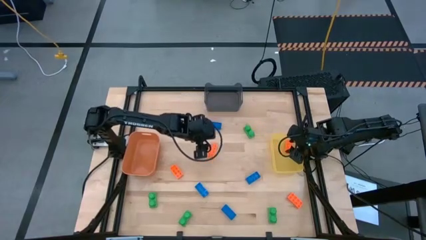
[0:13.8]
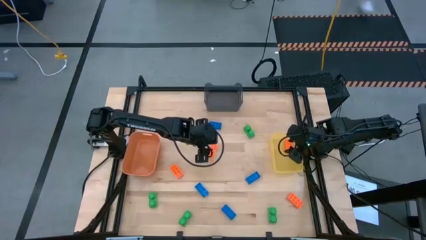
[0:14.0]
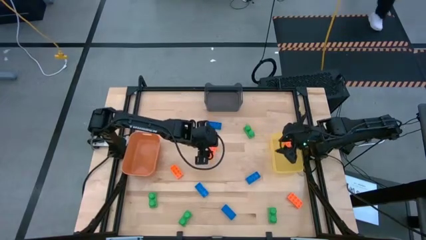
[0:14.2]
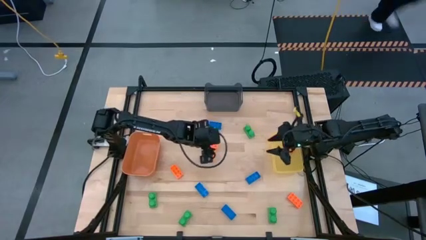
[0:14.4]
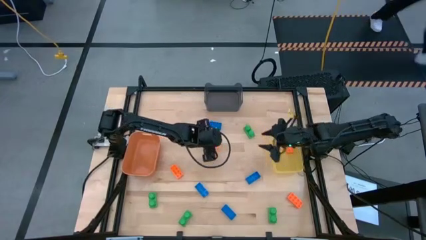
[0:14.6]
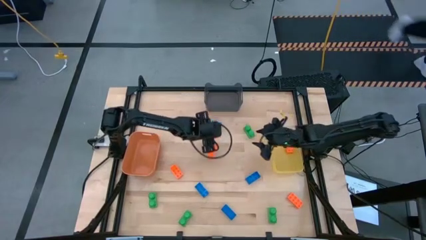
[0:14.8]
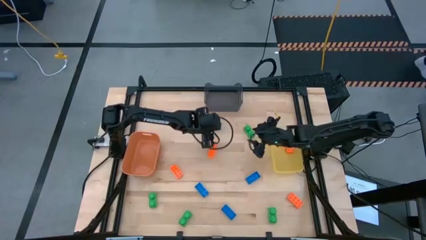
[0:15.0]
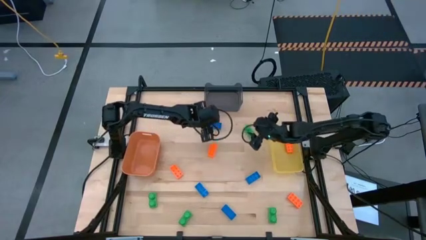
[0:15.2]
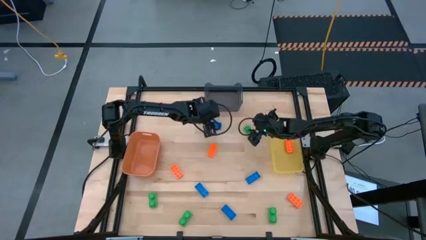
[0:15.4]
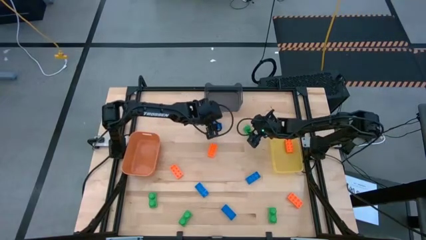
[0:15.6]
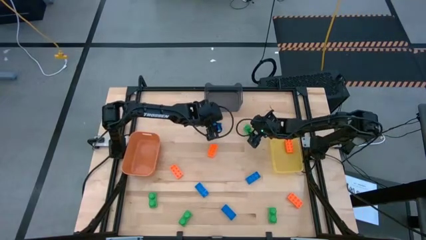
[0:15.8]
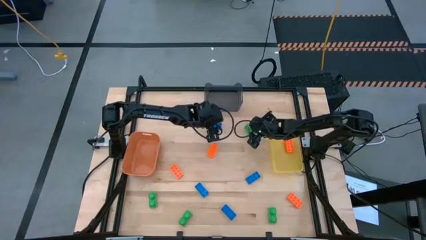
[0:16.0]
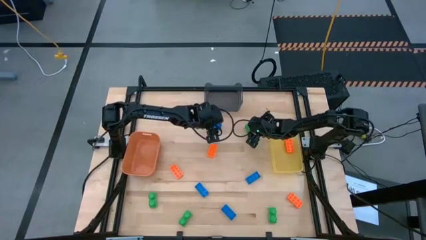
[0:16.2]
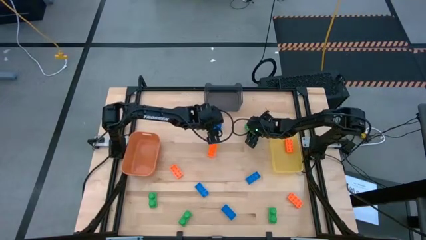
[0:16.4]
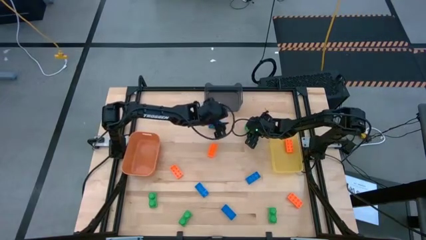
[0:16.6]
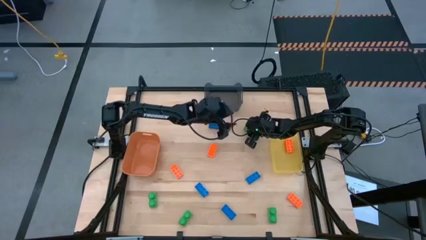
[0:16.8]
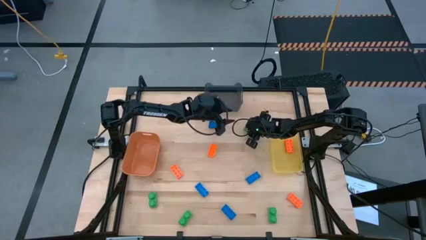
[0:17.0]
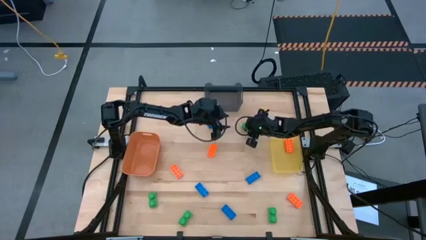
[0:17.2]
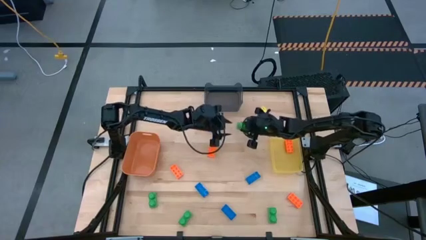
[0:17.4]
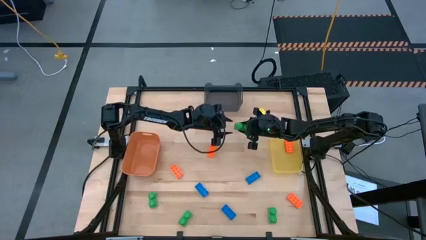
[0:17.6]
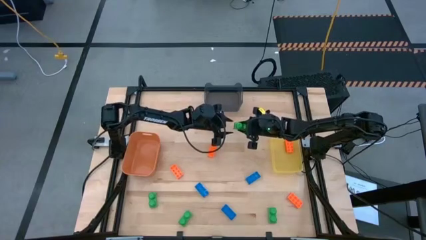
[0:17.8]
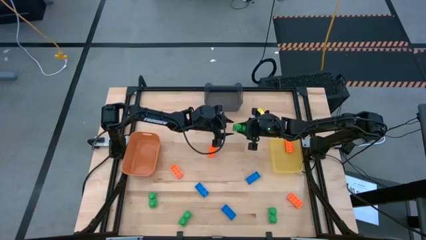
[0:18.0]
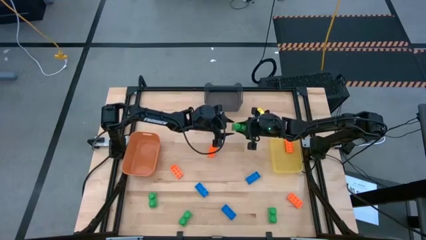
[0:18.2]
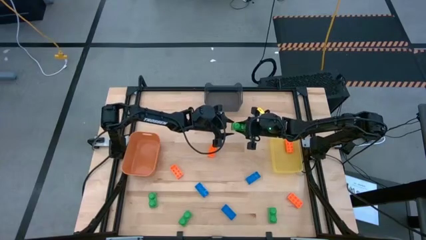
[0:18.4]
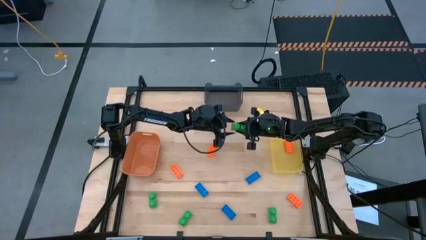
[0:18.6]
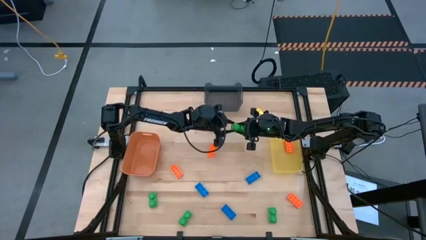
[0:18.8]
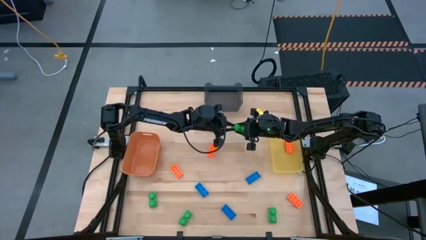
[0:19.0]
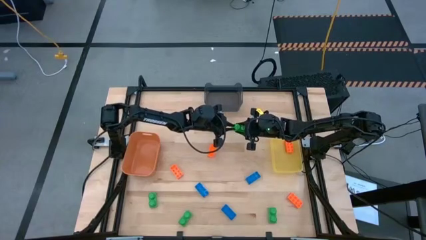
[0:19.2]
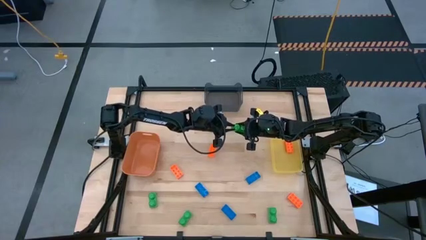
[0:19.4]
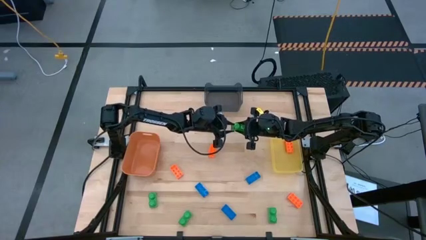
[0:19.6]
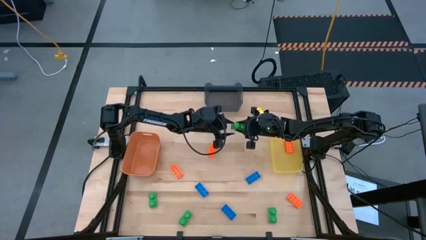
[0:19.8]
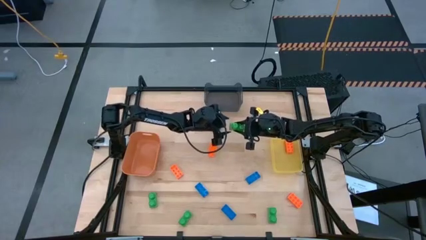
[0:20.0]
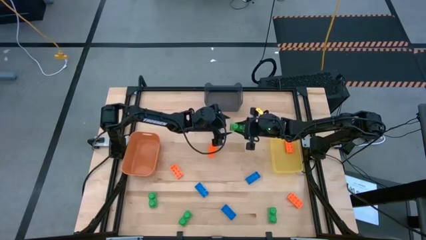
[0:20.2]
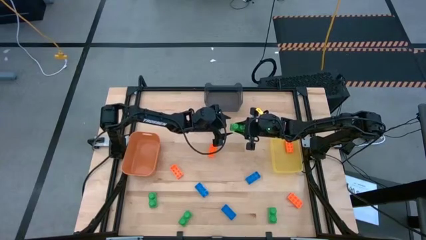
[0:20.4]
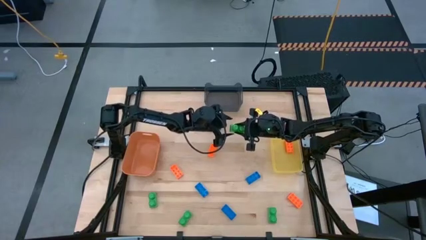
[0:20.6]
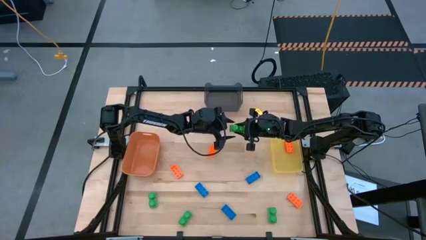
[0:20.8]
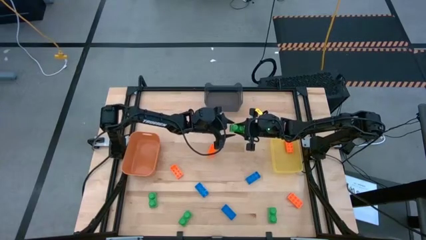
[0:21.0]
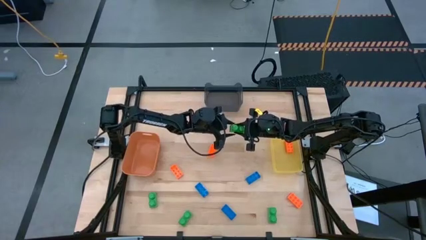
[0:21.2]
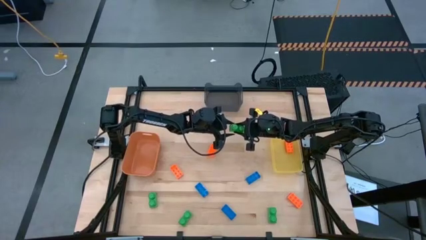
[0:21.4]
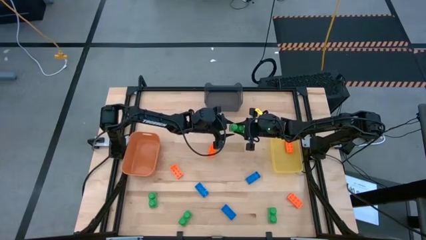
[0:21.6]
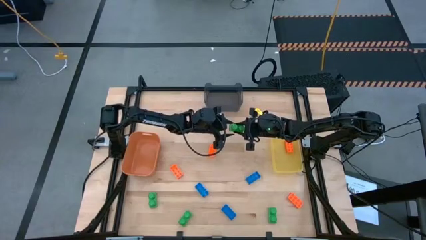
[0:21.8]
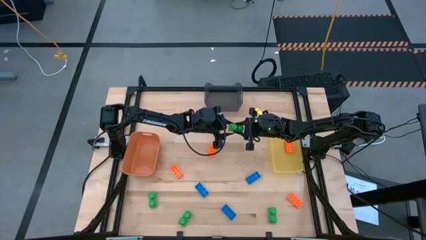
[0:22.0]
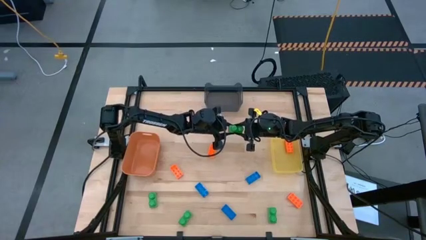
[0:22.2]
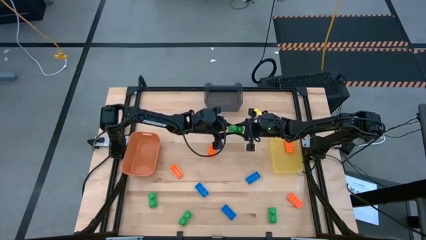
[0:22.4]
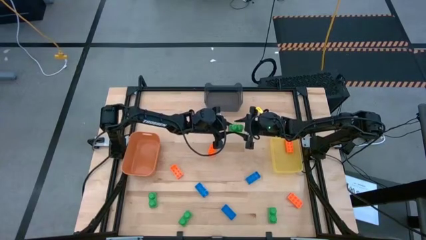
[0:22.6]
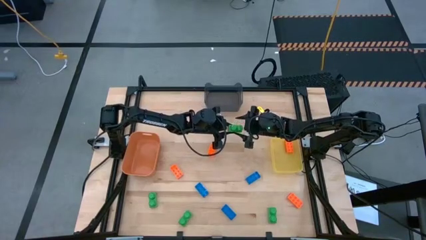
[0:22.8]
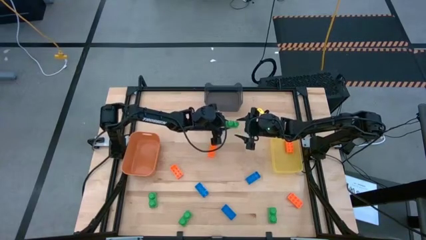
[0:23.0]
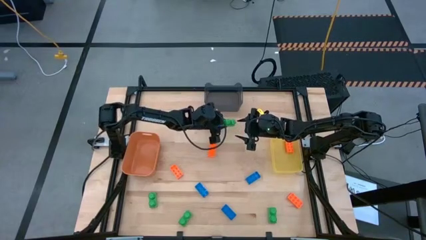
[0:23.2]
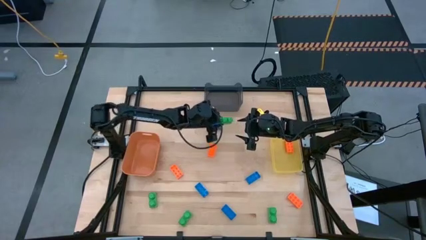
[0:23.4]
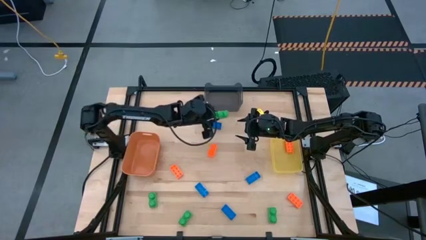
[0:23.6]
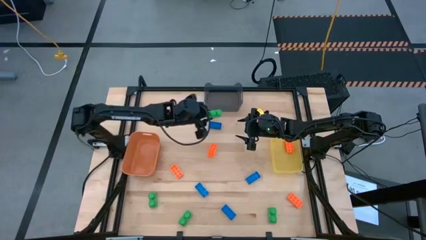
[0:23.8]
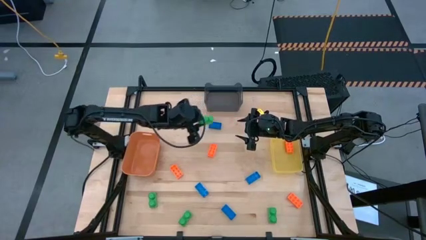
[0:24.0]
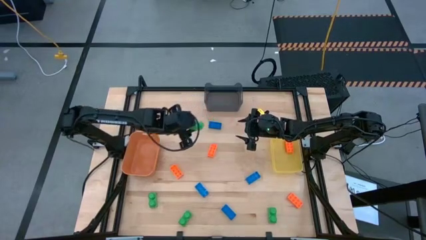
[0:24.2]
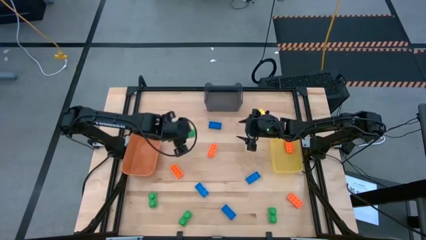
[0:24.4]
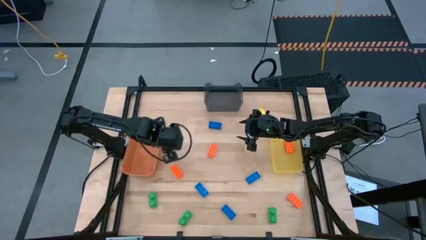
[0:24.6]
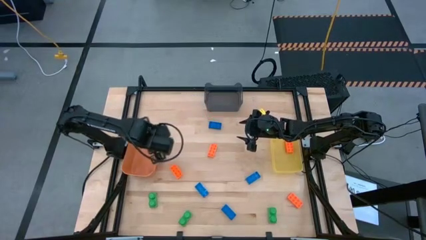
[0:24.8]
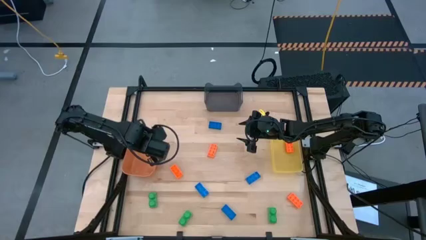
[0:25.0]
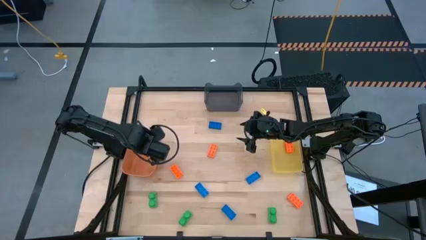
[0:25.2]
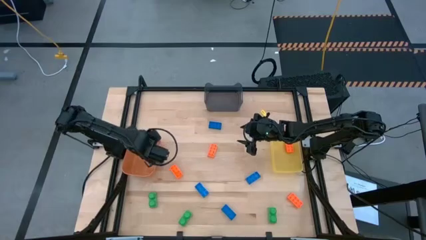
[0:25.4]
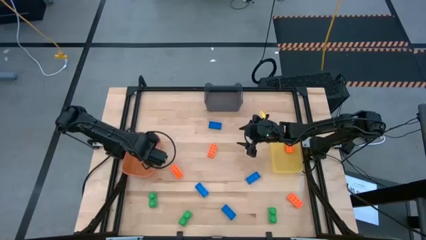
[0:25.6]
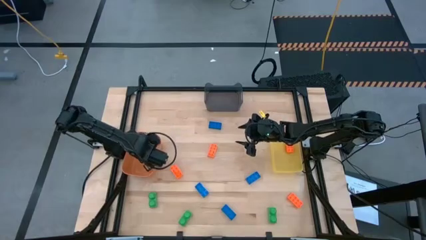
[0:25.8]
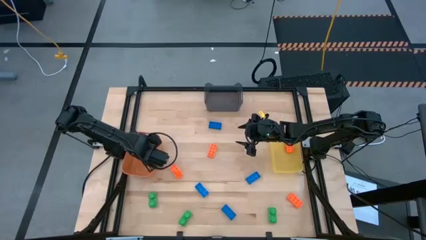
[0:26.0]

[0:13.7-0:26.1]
Task: Sort & place blocks by color
Put the green game piece into the orange bin
